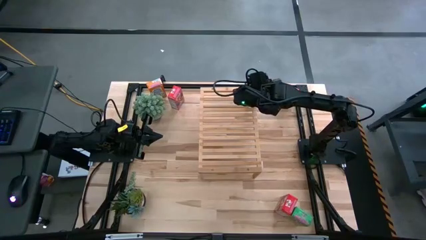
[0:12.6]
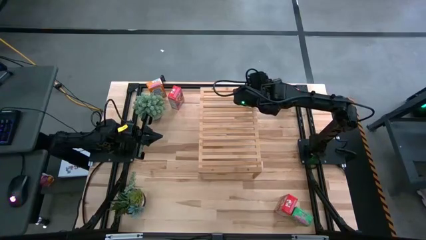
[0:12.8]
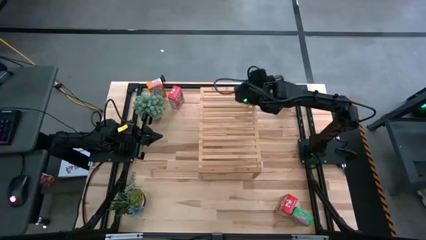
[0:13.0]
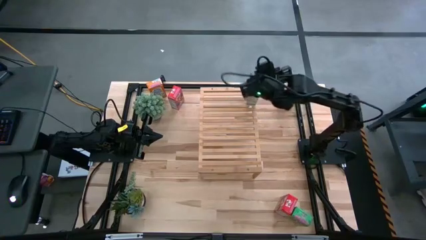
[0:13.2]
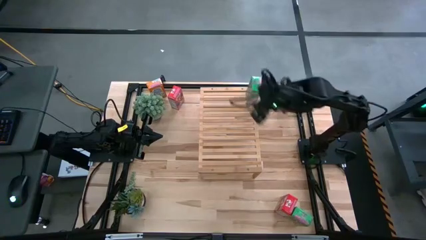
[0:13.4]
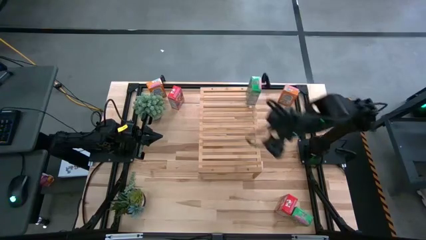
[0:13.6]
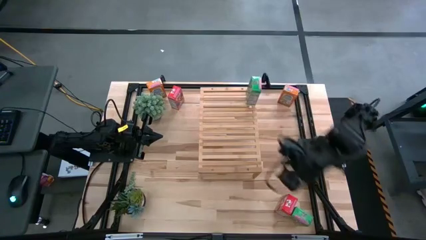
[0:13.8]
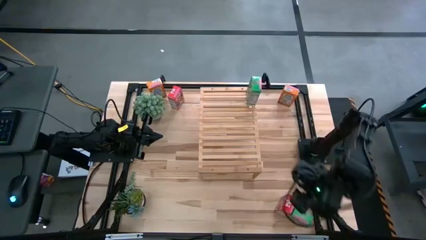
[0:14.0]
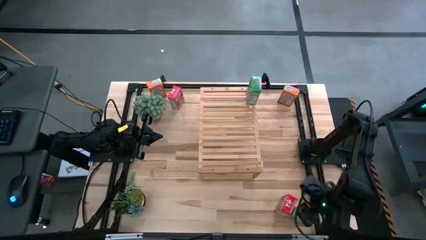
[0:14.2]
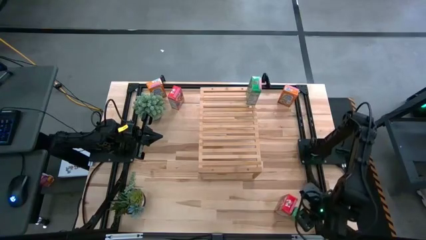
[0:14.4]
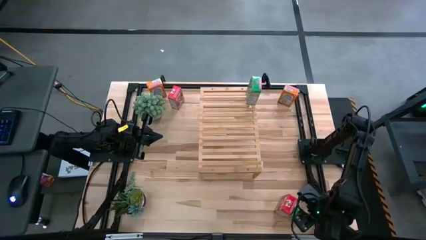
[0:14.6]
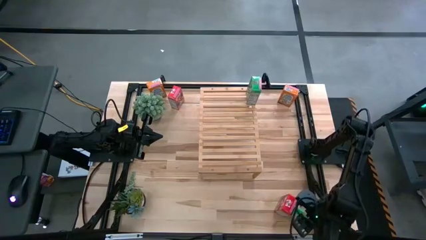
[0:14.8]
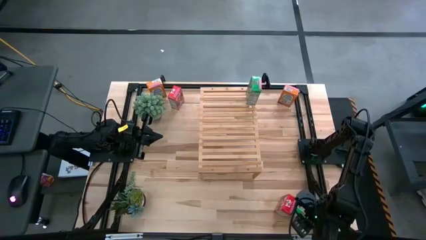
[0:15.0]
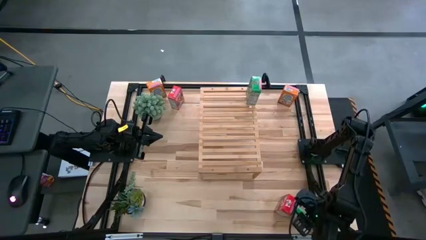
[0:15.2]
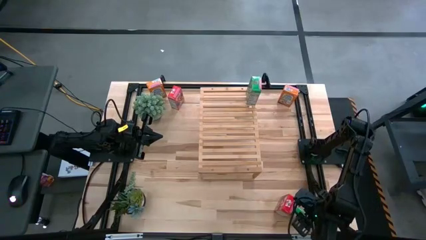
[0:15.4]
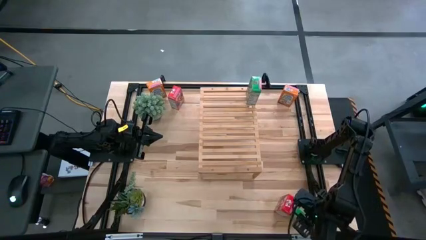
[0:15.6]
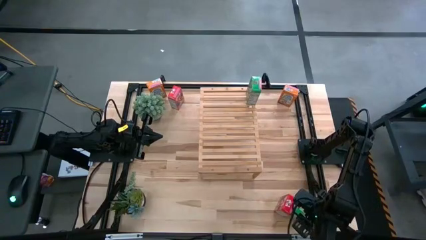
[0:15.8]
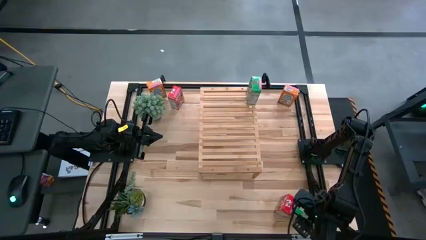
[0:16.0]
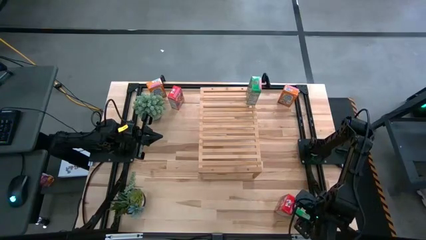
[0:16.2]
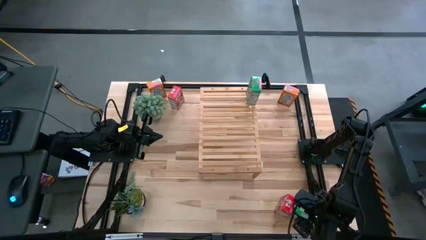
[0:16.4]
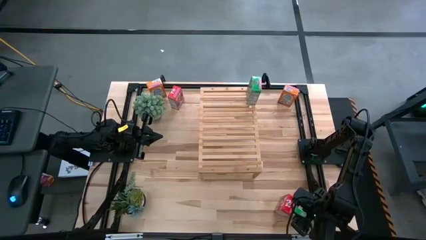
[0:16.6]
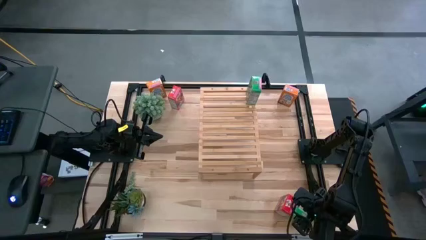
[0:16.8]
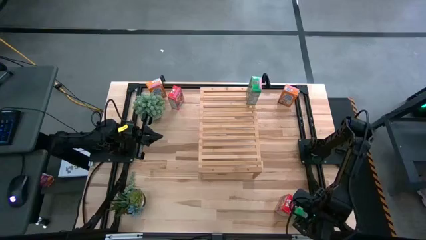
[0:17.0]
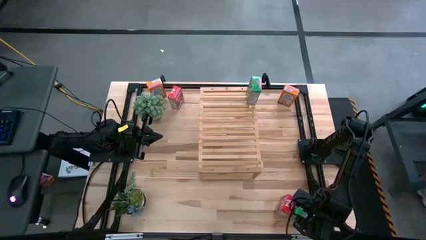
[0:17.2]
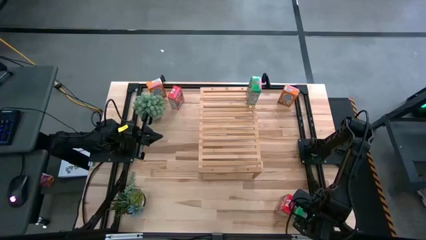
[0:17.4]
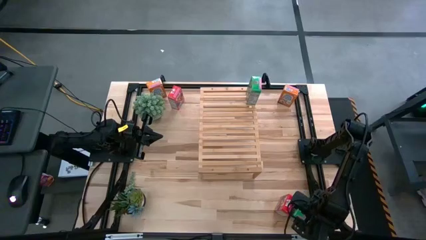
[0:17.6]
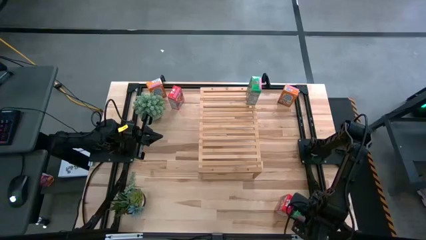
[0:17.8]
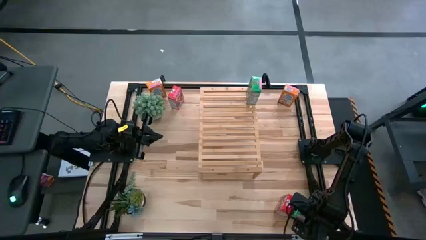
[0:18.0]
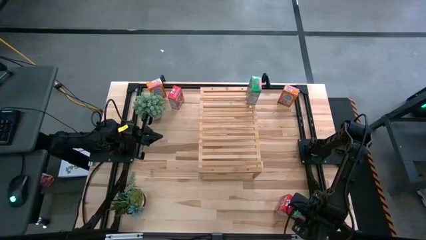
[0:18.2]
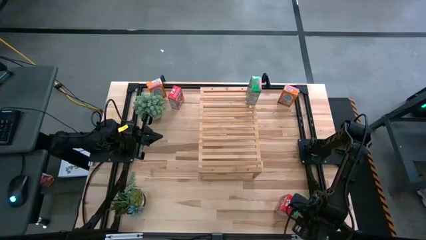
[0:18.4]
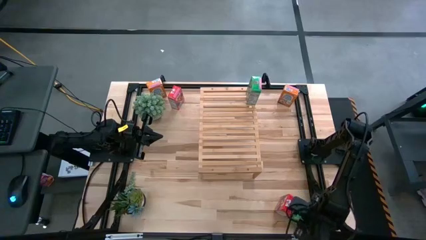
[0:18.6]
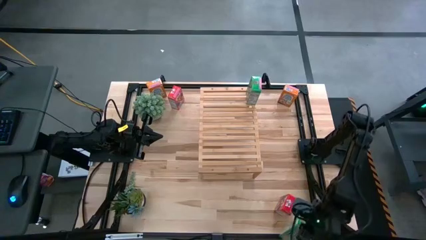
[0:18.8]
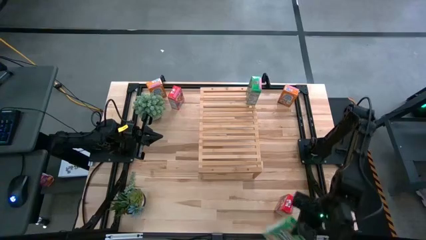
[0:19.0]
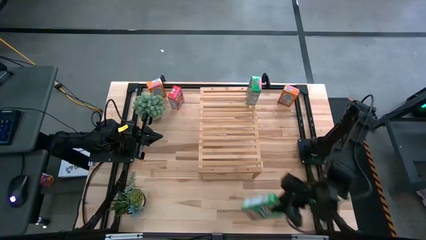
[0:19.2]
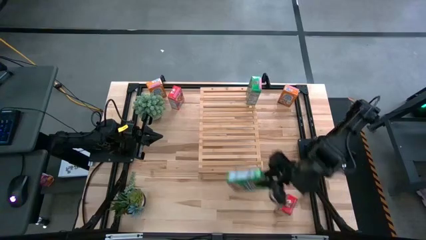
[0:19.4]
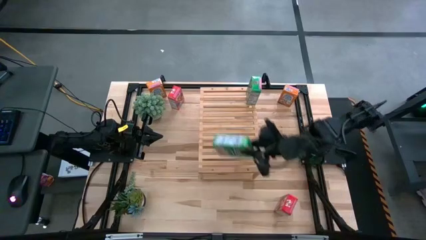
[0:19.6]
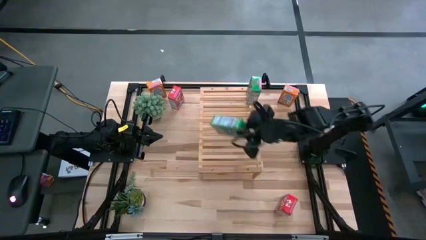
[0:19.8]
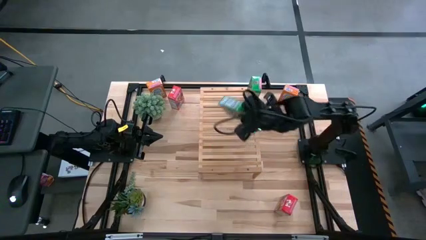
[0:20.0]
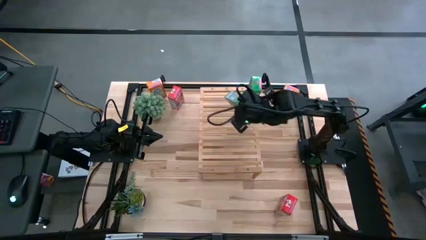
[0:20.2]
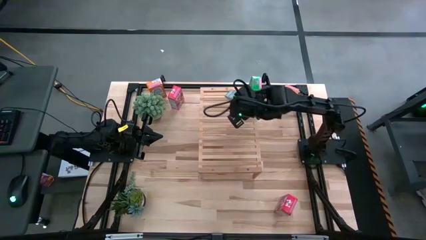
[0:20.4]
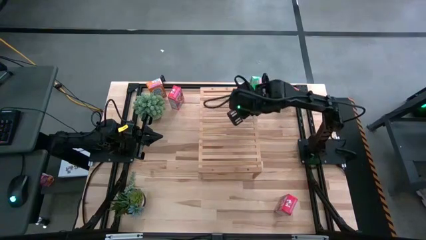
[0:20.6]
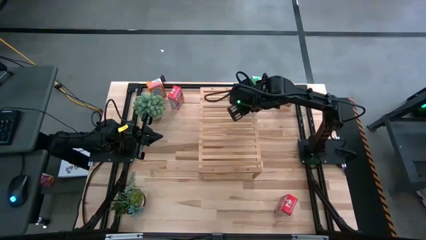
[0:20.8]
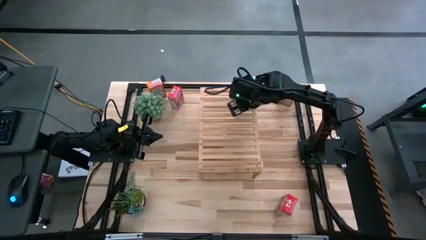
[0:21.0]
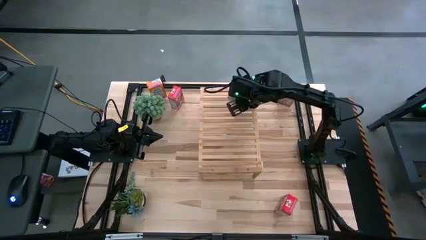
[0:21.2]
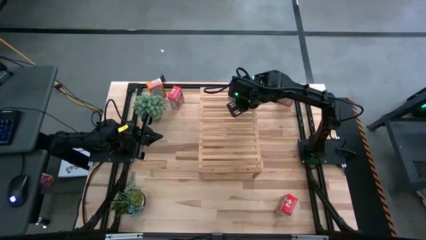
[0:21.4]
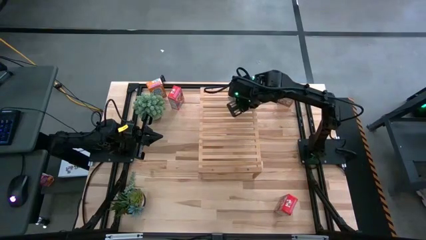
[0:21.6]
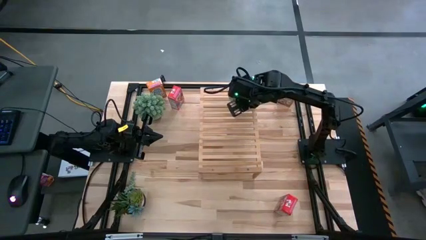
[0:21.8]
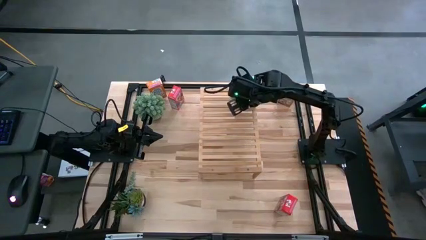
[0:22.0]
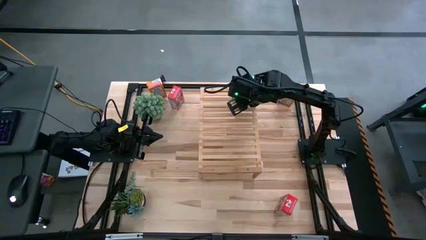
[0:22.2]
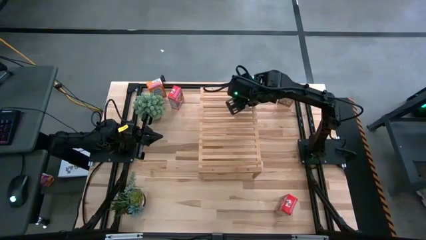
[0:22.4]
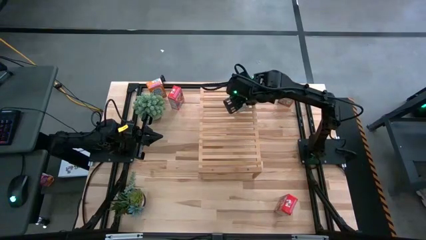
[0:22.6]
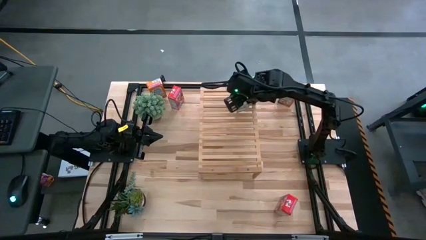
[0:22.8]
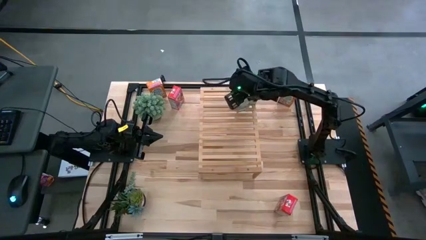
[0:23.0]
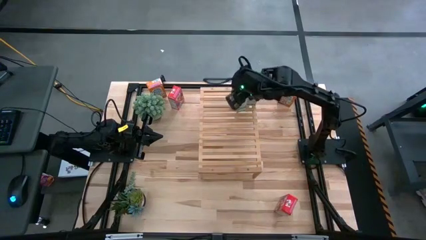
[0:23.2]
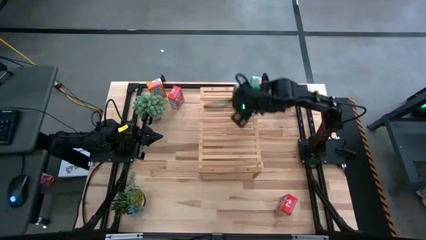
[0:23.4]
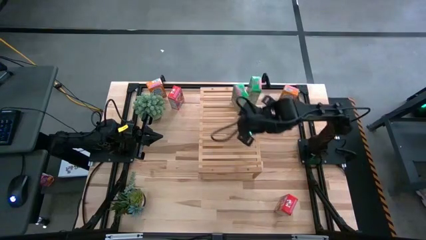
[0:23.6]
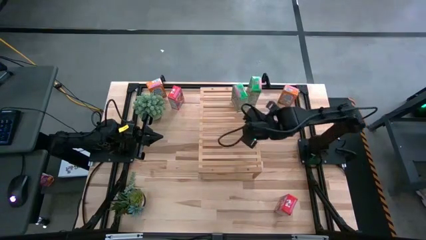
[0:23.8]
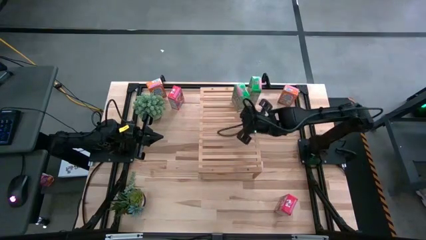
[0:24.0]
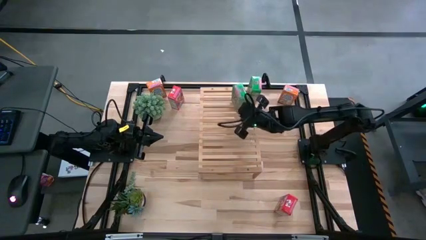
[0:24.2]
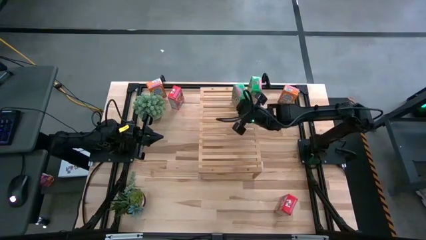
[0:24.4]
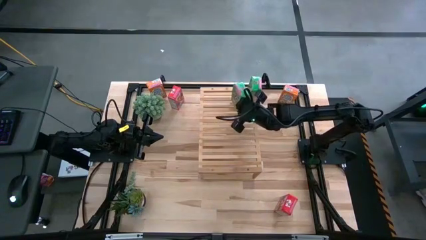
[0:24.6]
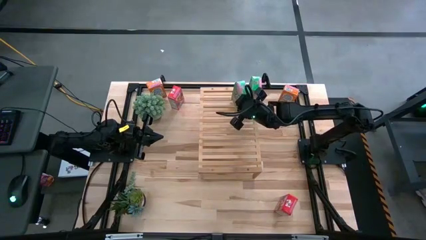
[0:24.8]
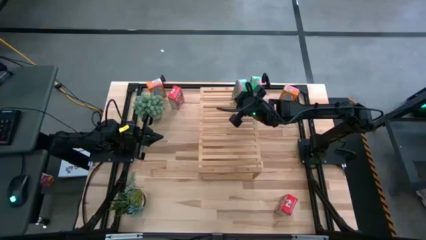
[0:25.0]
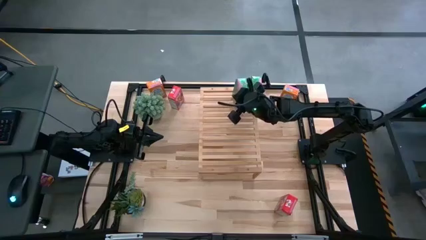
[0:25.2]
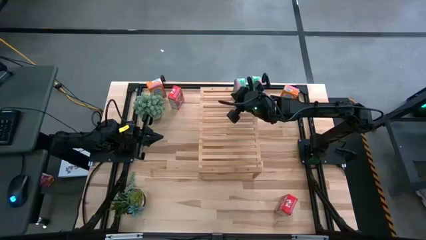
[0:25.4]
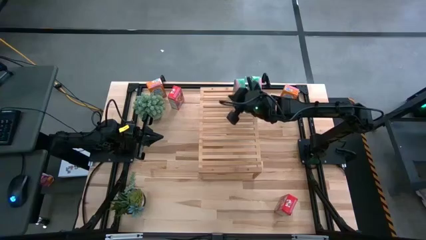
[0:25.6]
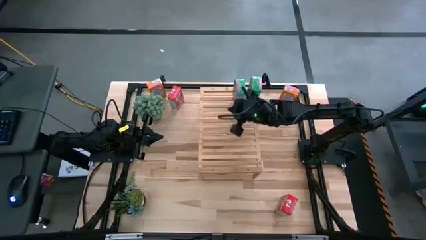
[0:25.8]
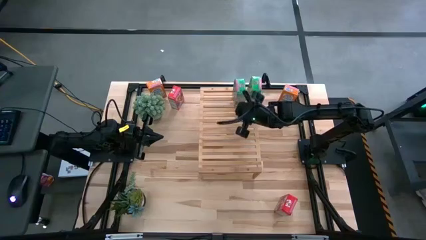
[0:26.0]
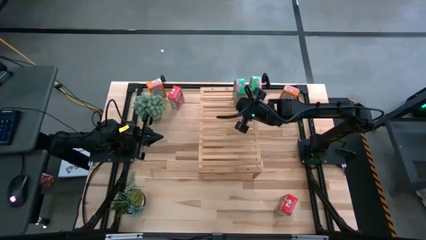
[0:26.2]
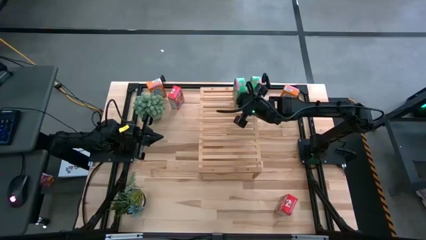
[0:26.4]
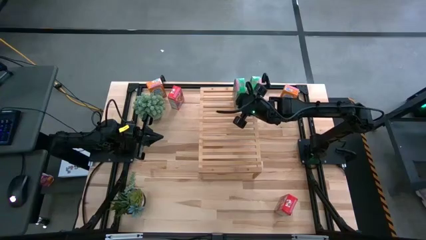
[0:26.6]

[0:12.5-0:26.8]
Task: Stack cereal on shelf
Put the green cereal box on the shelf aligned with the other green cereal box
